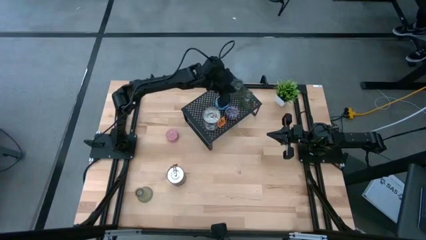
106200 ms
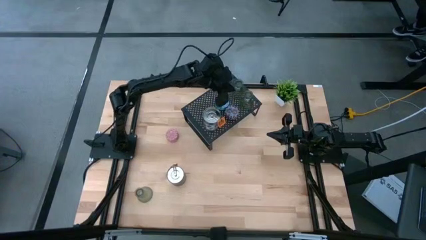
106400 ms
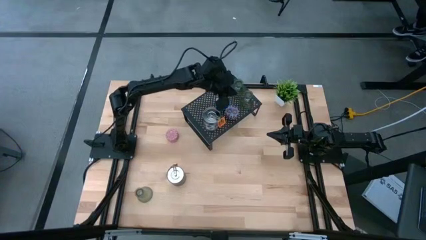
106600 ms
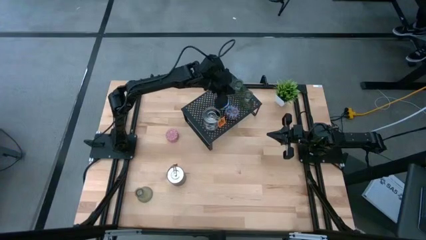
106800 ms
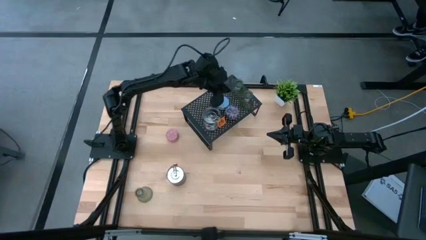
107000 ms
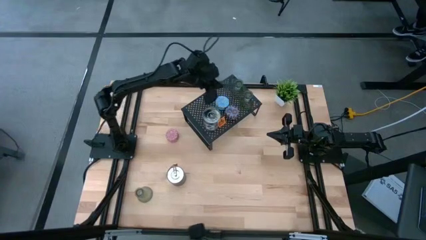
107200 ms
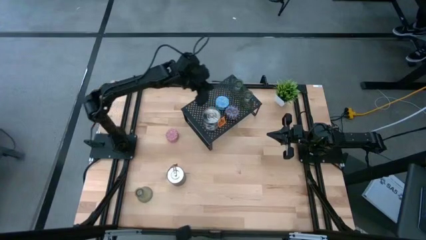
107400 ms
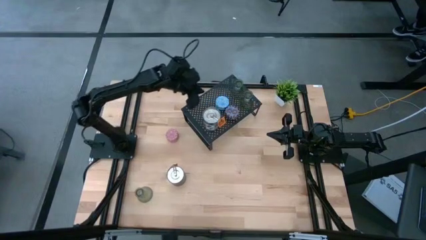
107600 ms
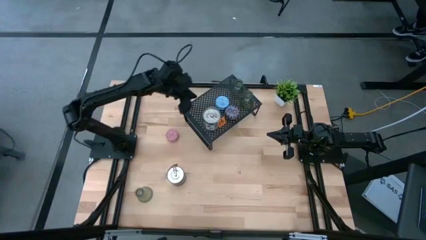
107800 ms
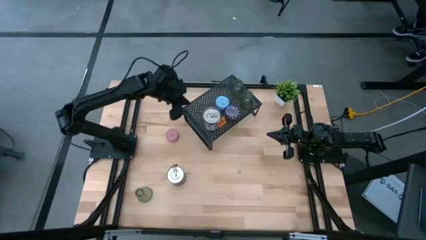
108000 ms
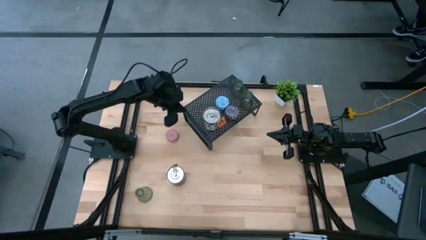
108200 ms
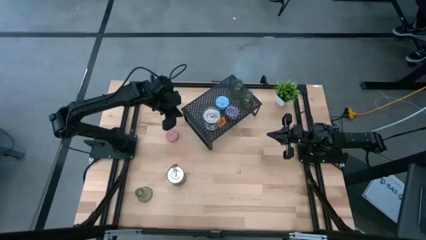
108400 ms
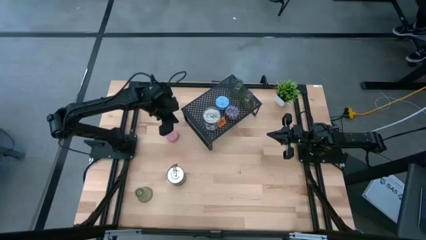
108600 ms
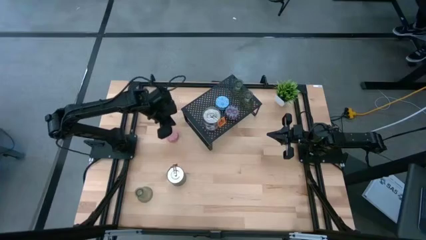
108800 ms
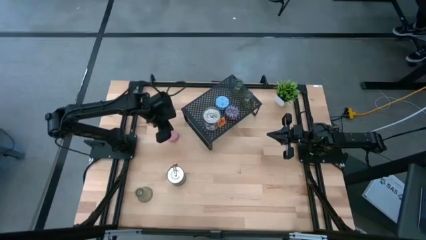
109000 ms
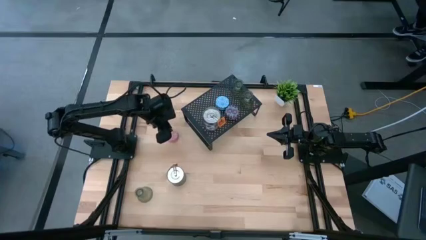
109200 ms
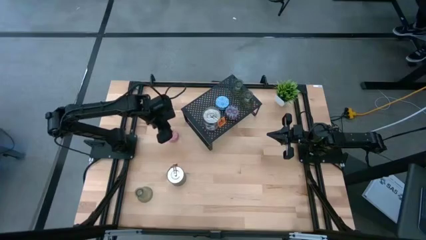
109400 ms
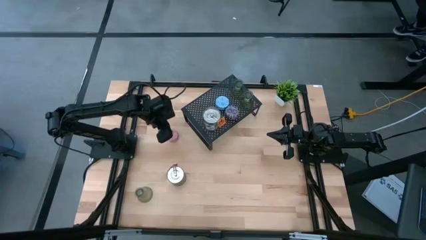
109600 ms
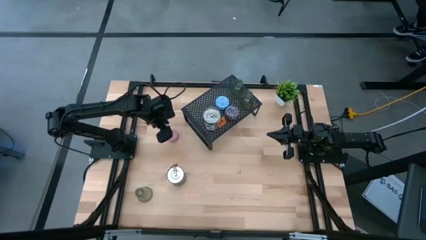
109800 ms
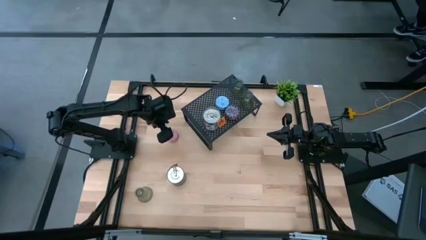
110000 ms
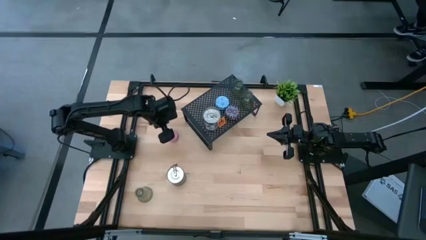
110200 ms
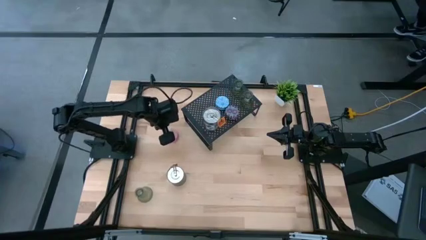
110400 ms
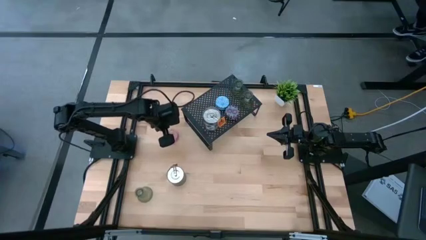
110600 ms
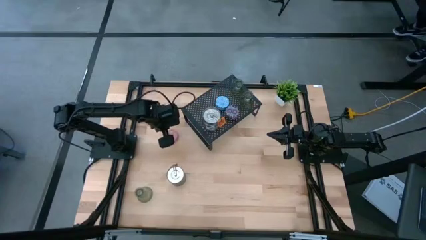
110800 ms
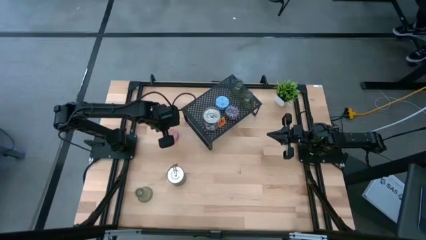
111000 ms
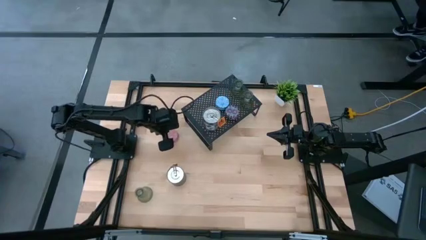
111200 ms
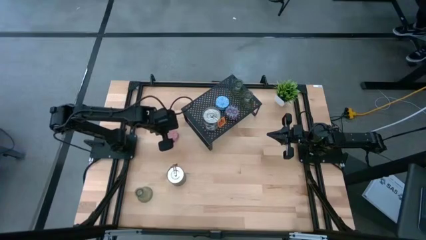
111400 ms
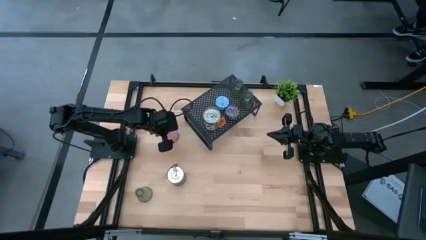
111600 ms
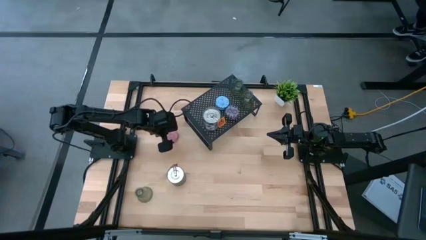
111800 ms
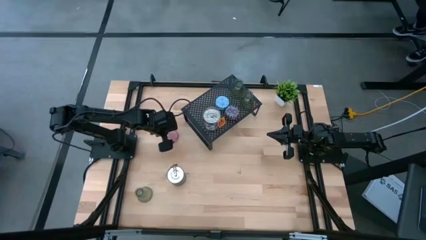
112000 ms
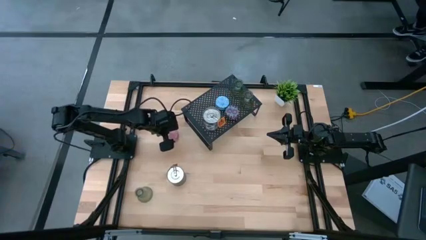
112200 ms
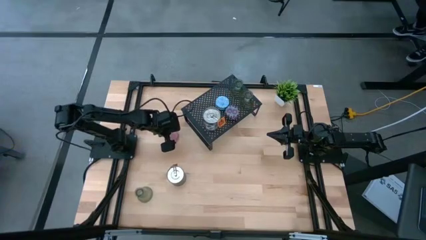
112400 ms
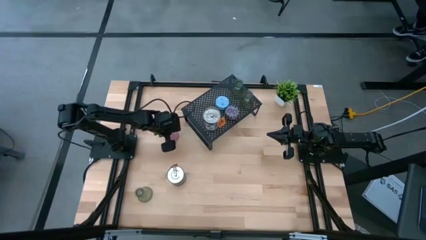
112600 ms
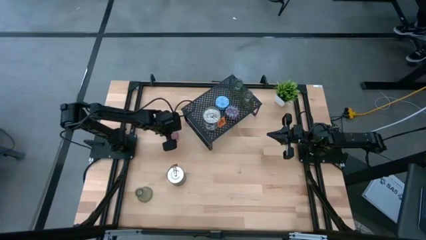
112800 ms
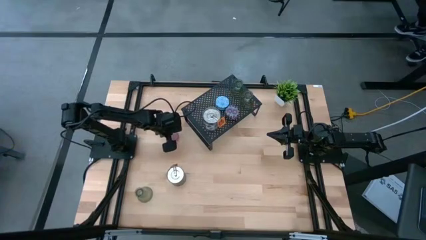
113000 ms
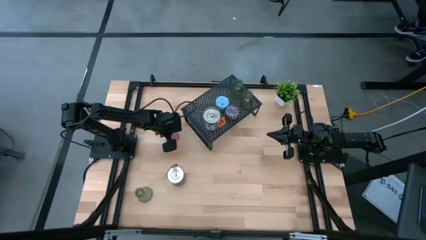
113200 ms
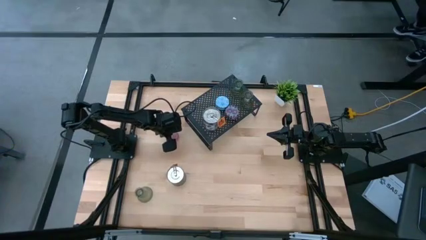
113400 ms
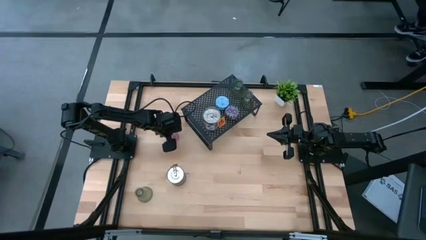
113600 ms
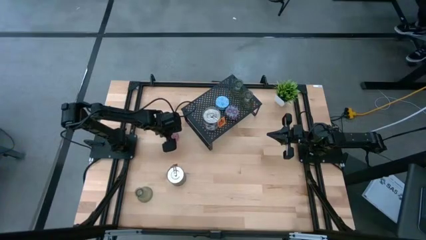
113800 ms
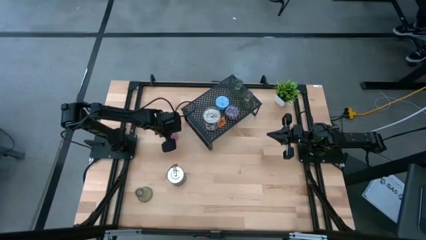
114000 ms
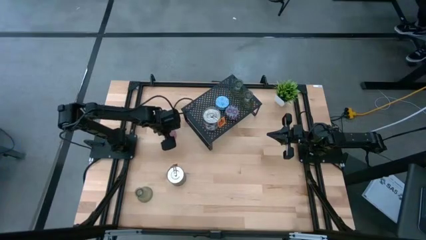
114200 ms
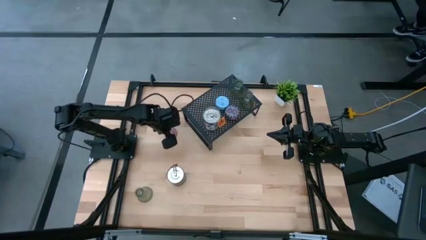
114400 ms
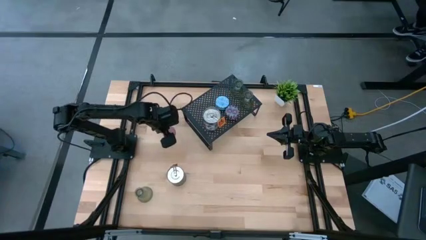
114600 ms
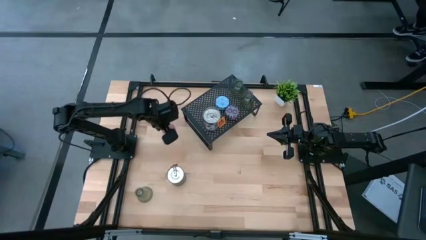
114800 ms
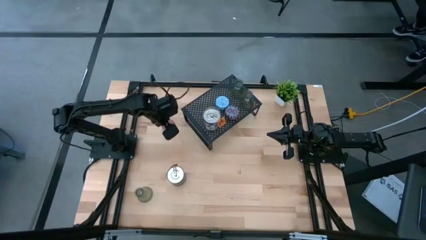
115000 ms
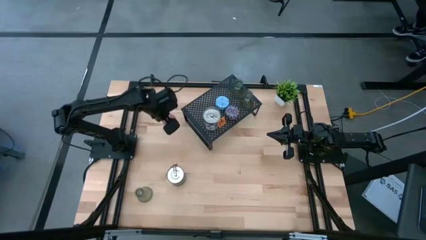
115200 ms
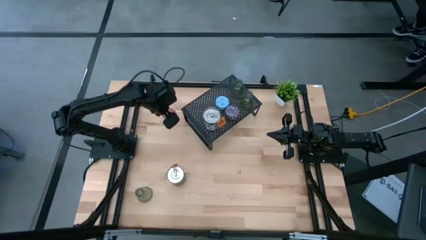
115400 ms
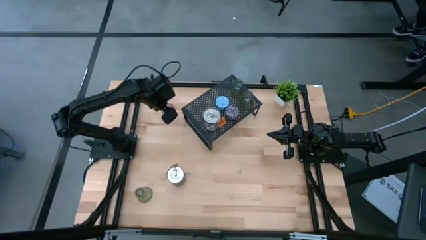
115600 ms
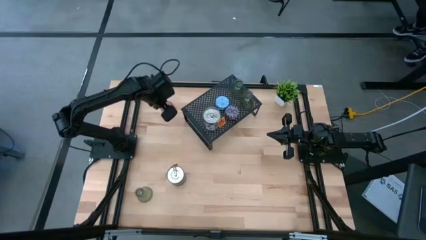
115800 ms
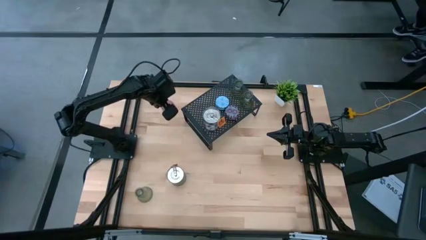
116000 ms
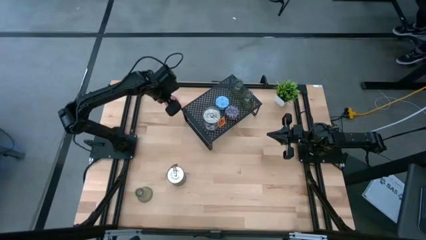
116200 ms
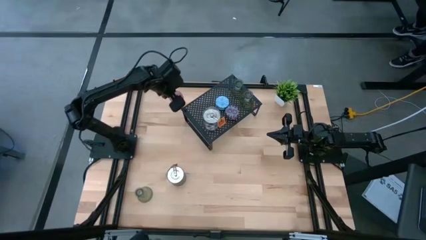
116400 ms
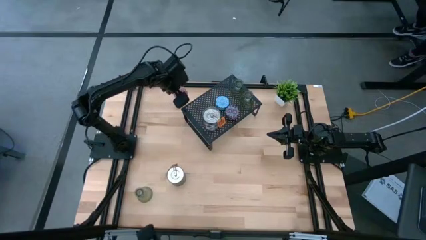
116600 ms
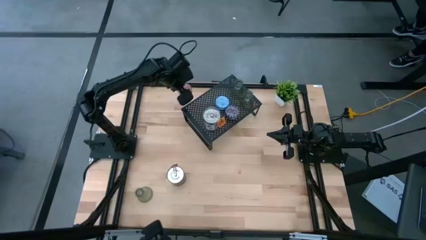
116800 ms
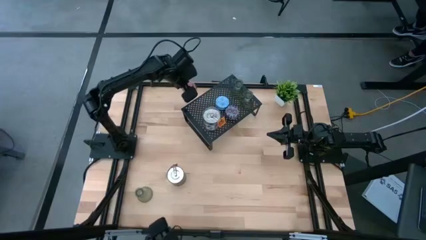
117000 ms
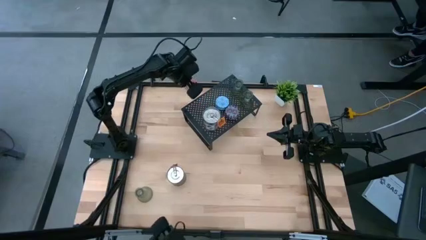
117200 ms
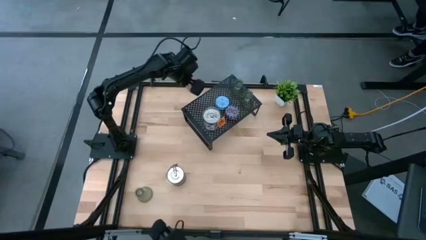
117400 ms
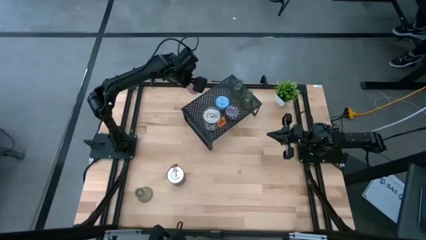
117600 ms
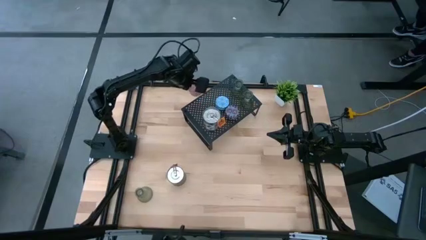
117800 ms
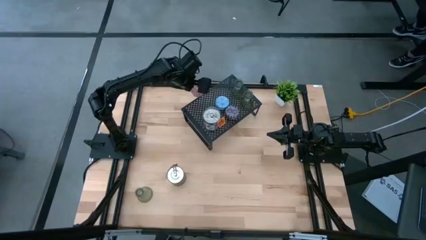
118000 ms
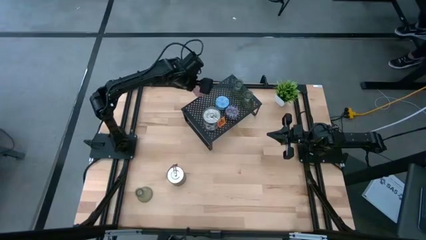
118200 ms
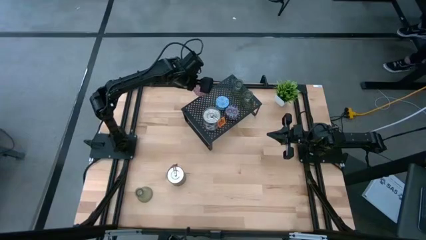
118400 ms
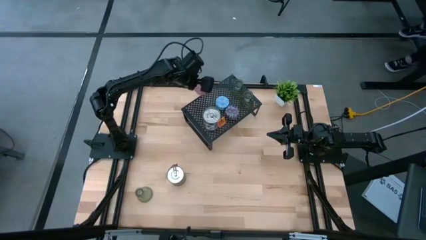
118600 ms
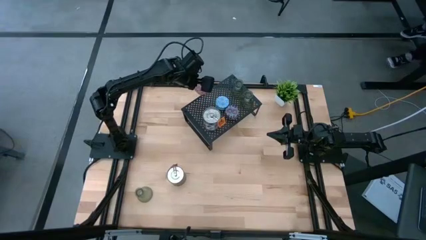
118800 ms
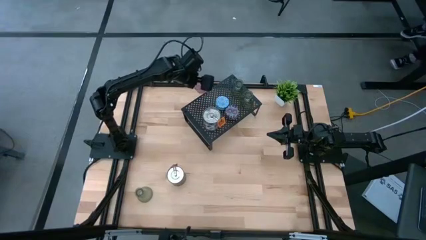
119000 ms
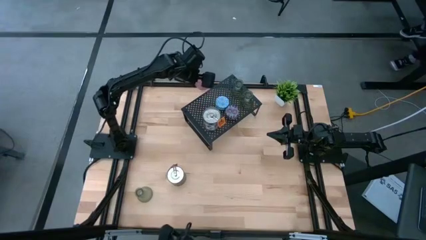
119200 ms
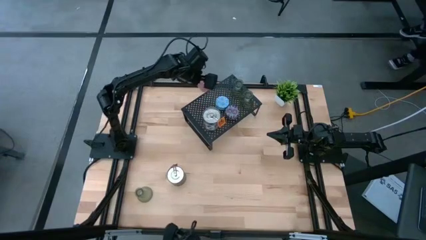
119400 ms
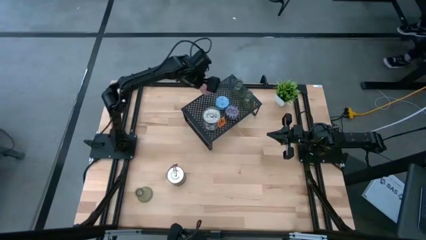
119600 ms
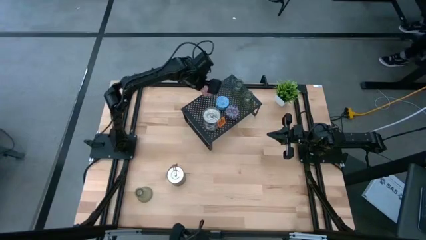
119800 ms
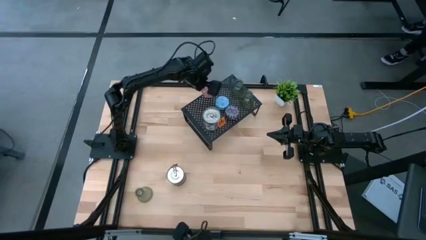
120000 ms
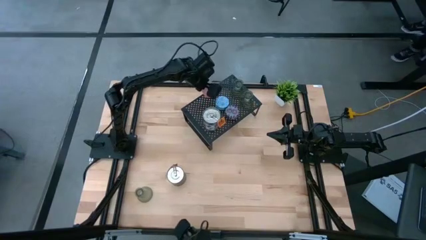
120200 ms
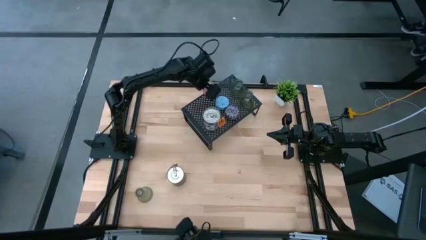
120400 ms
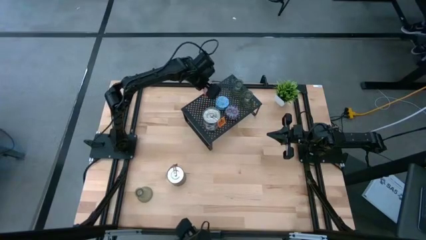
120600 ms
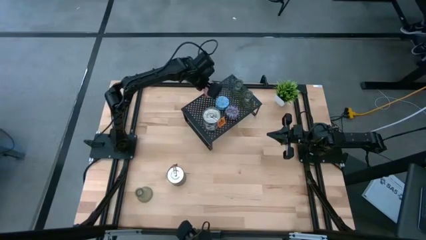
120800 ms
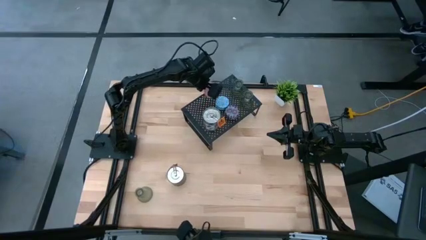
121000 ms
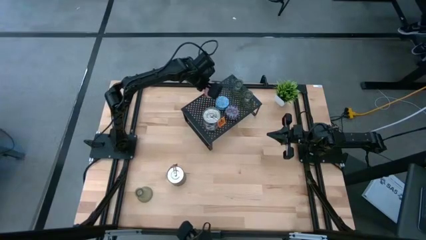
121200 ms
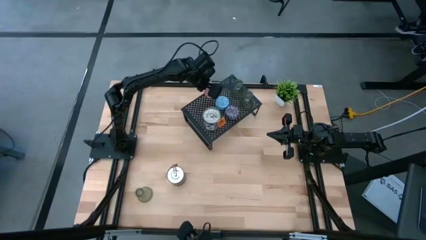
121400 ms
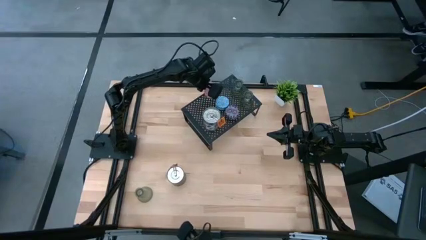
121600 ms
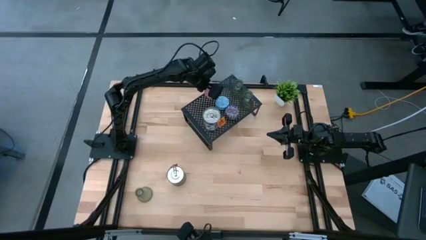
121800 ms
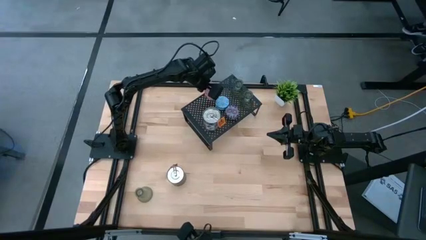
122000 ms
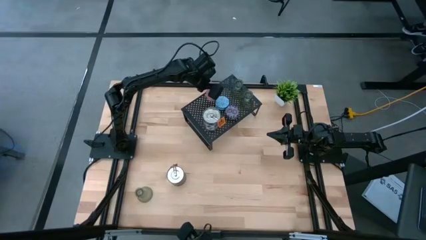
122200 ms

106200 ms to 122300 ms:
Task: Pick & Place candle stick holders
Put the pink small scented candle on the shelf aligned with the light blue small scented candles
